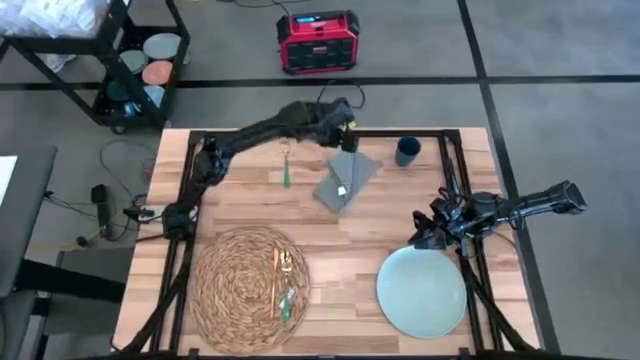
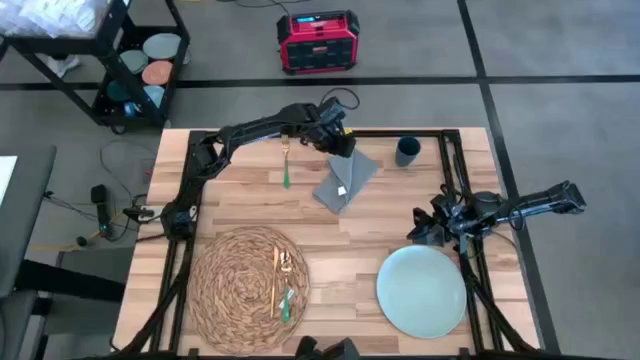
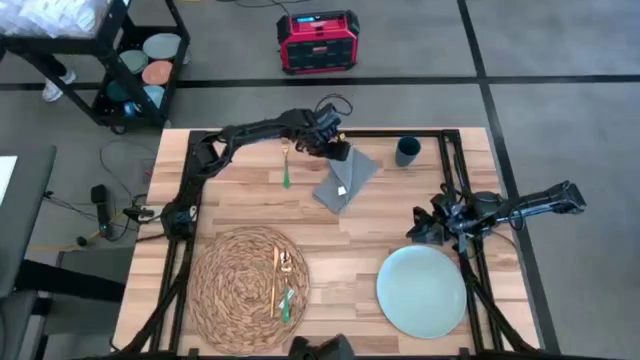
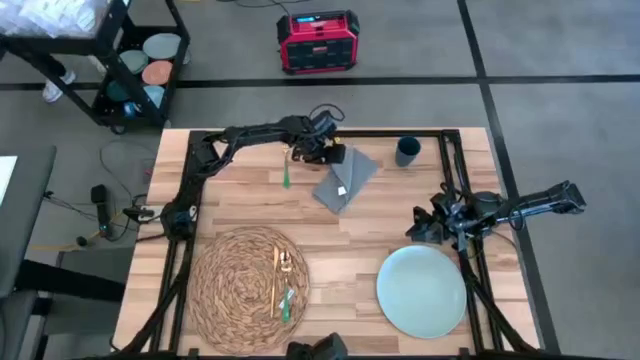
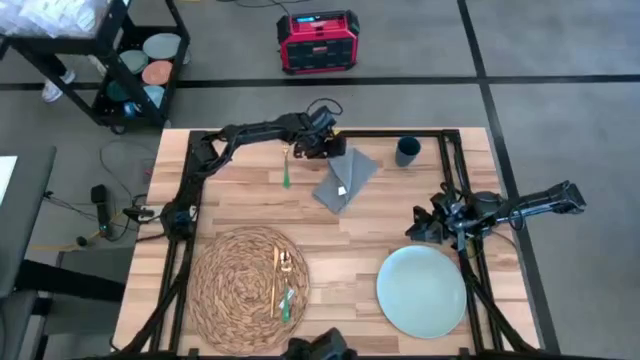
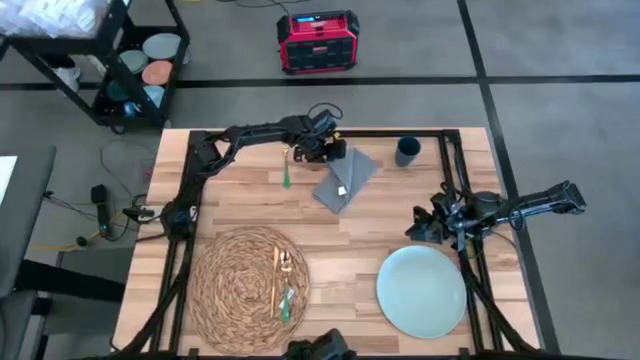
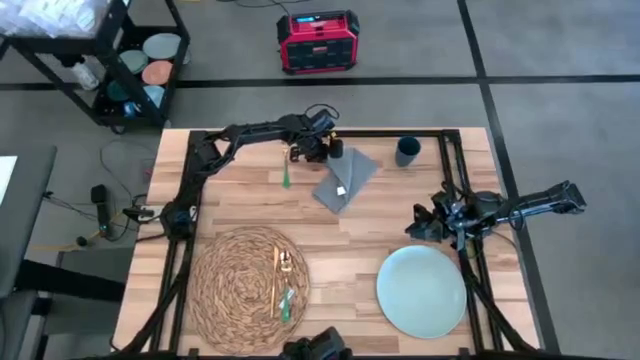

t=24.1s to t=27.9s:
Task: Set table place
Fold the gray table napkin

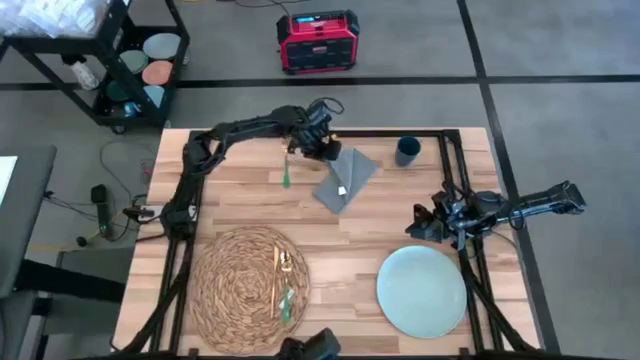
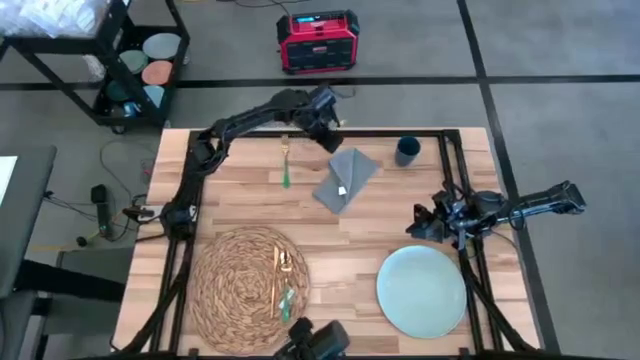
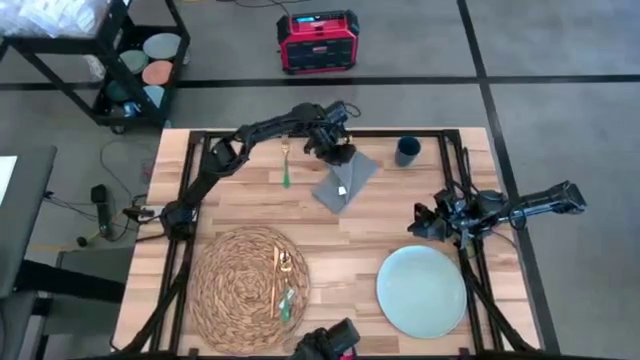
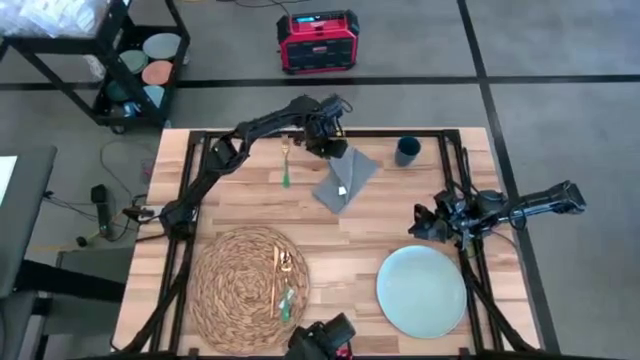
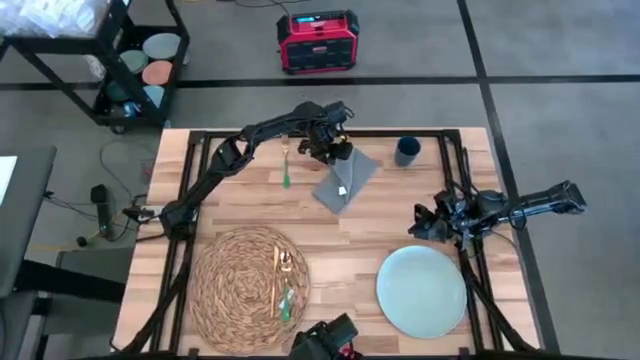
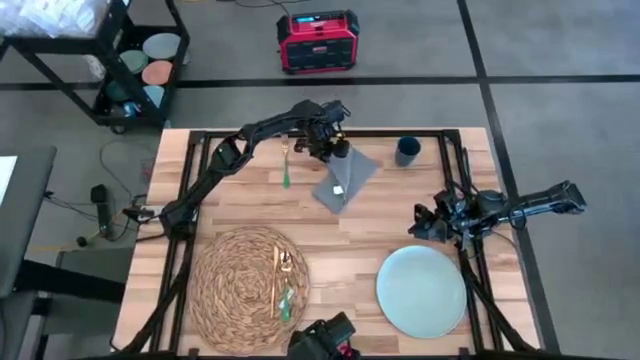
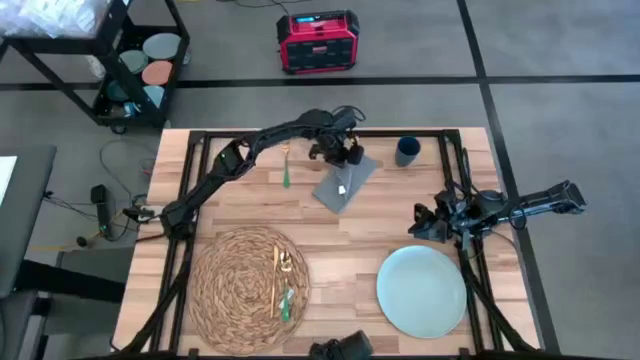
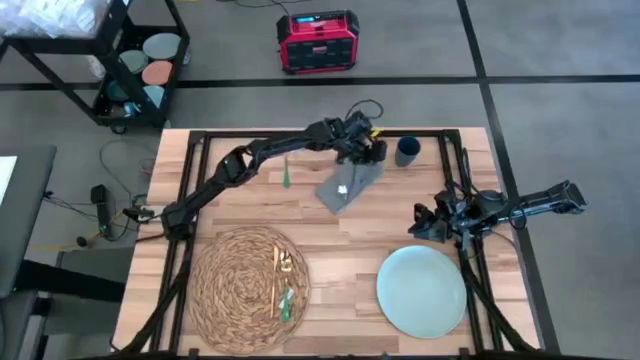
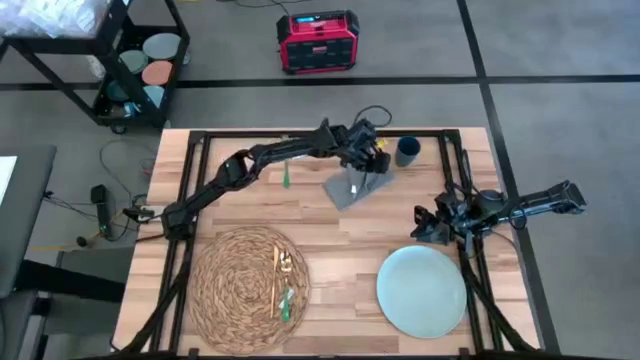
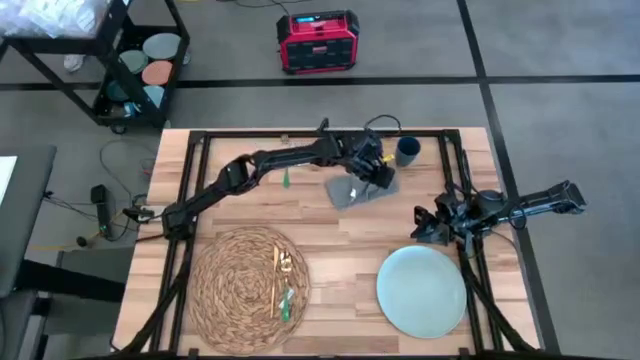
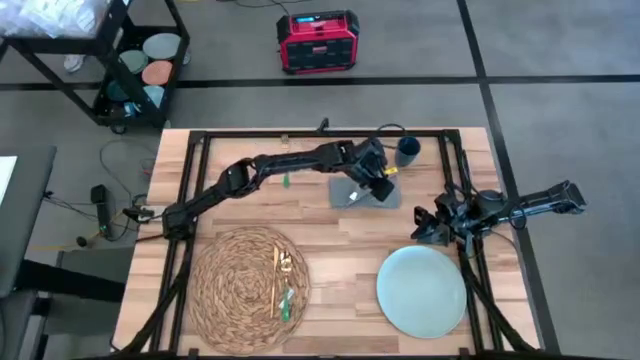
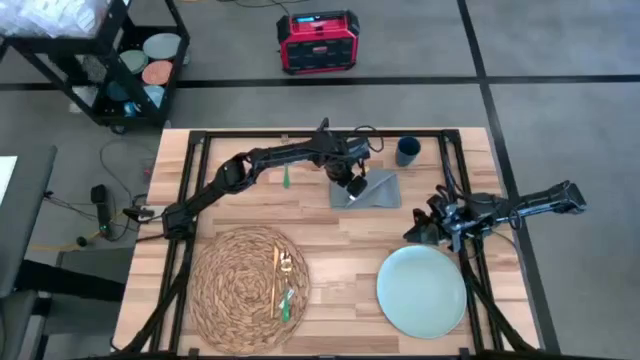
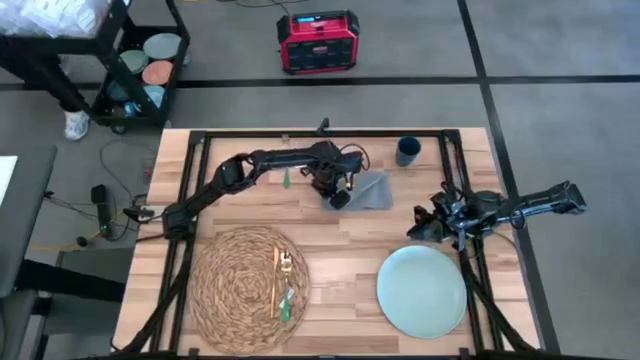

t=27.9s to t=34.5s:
Fold the gray table napkin

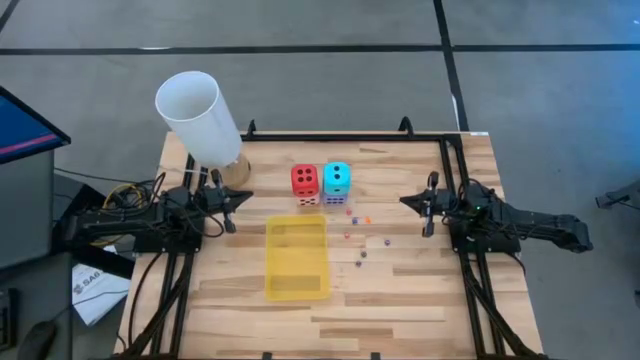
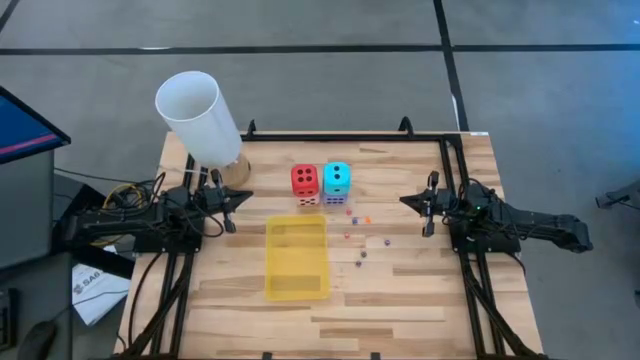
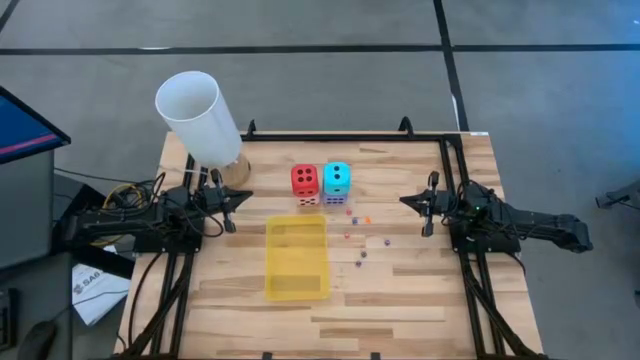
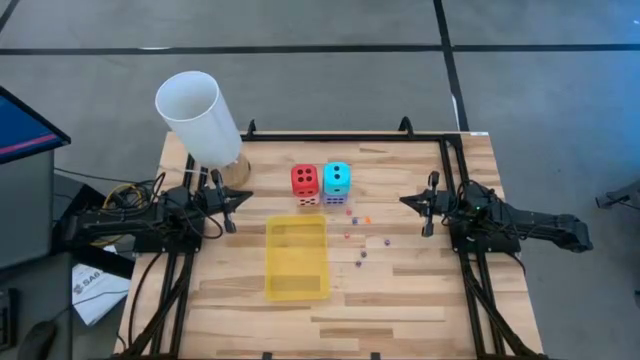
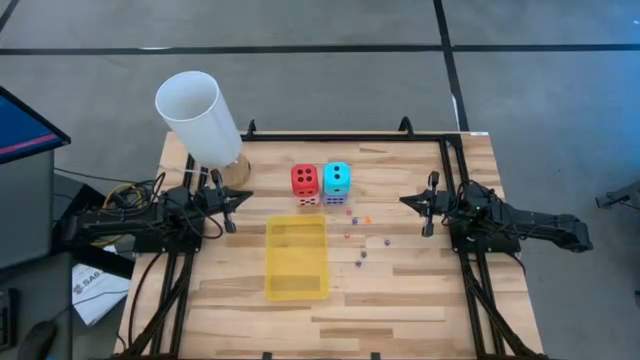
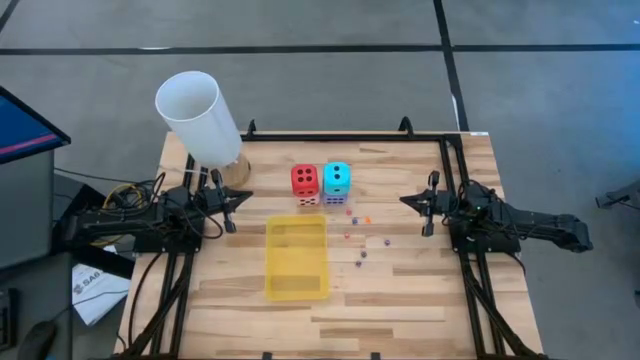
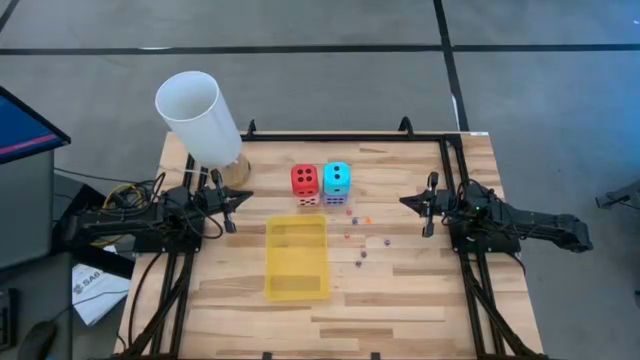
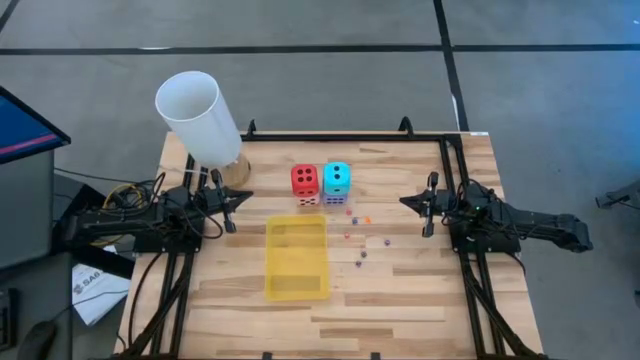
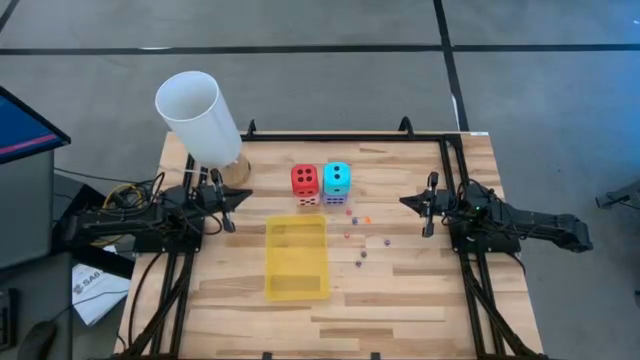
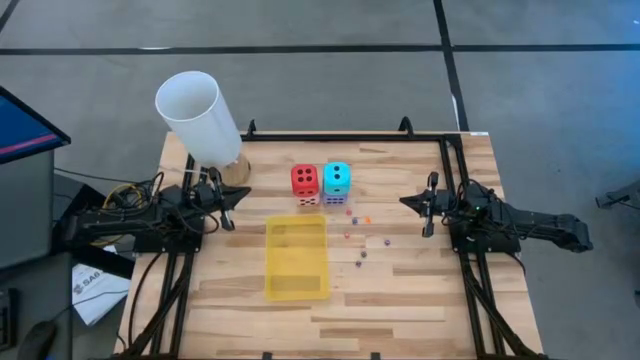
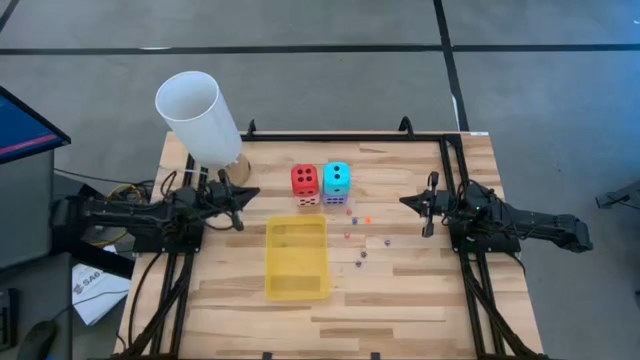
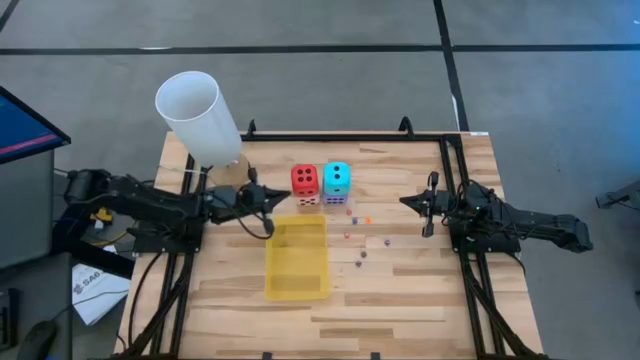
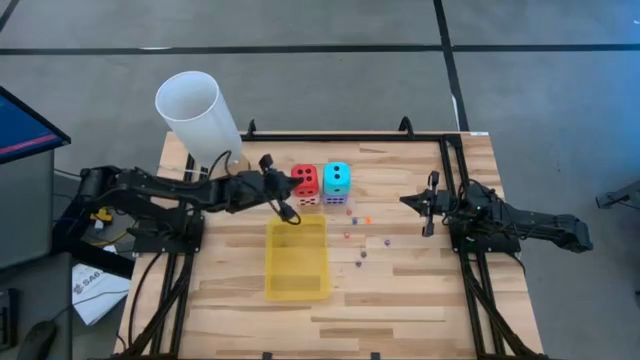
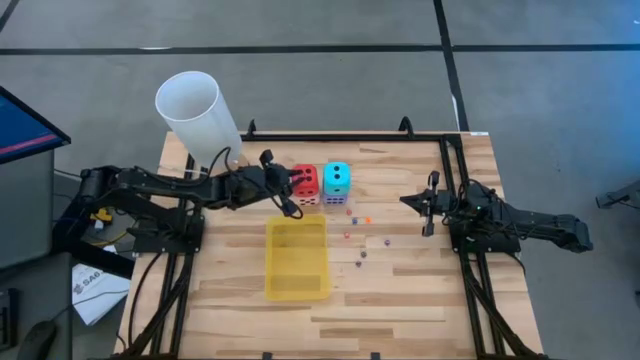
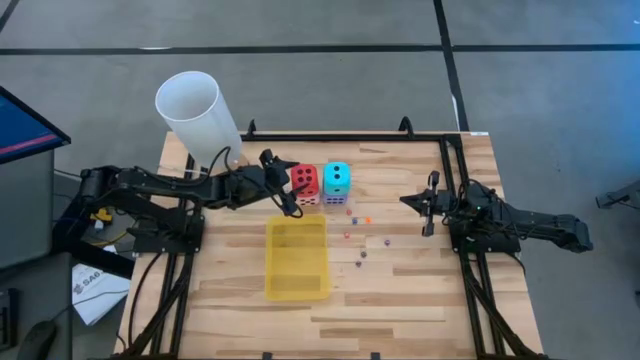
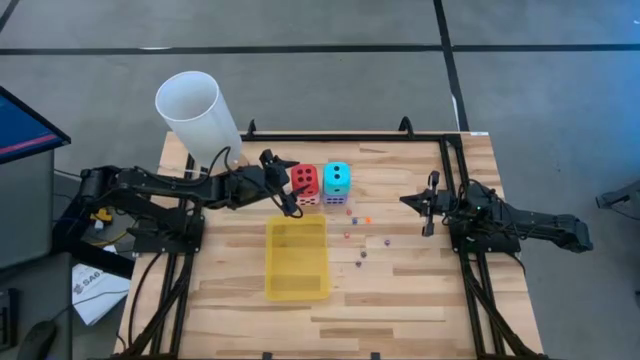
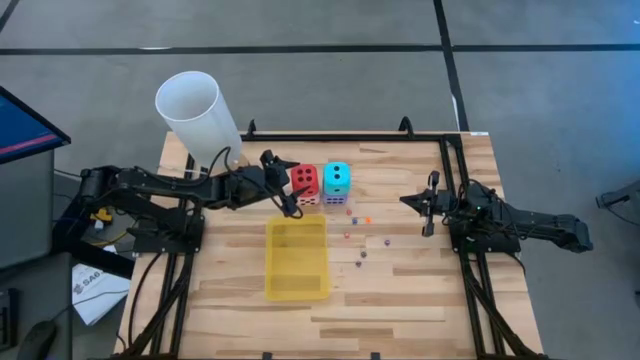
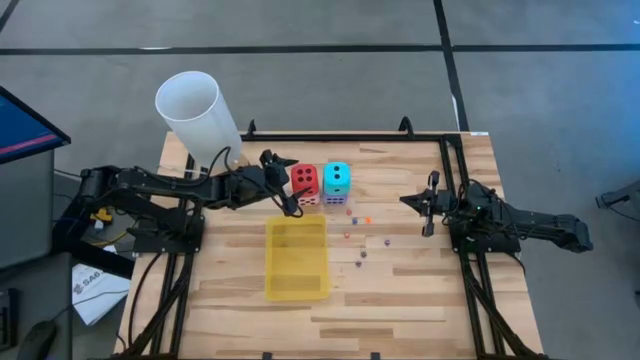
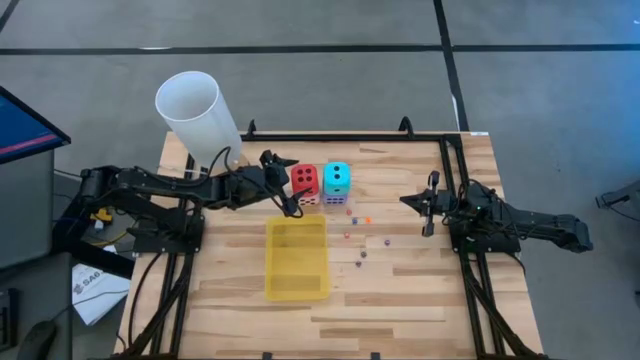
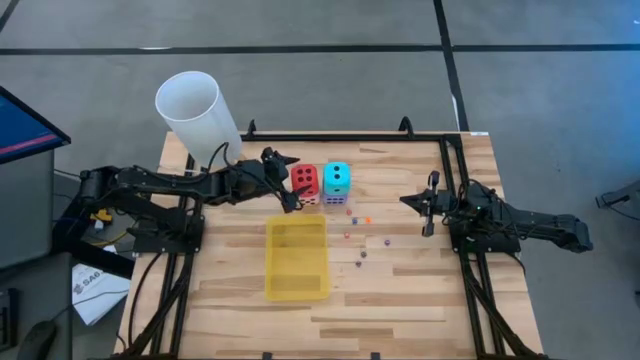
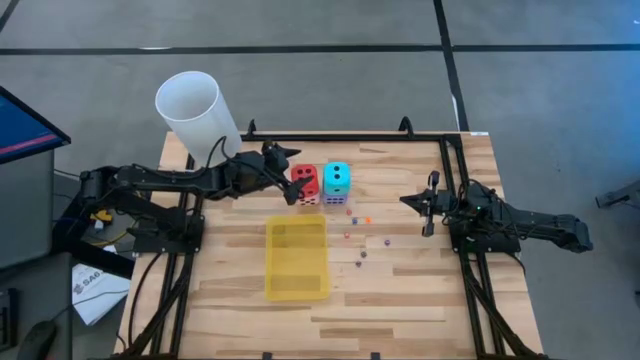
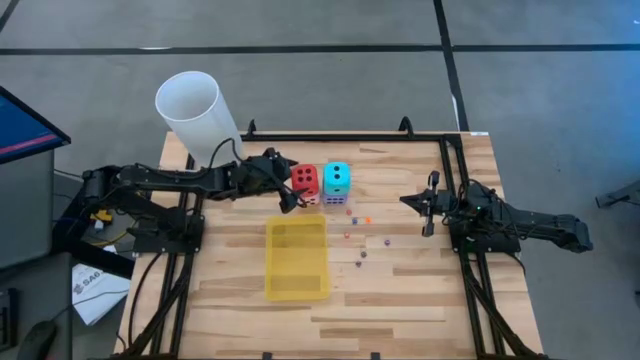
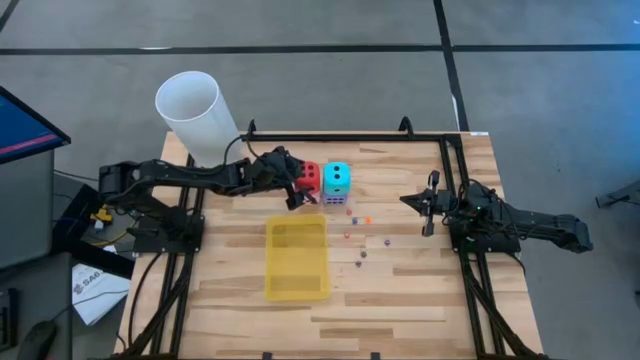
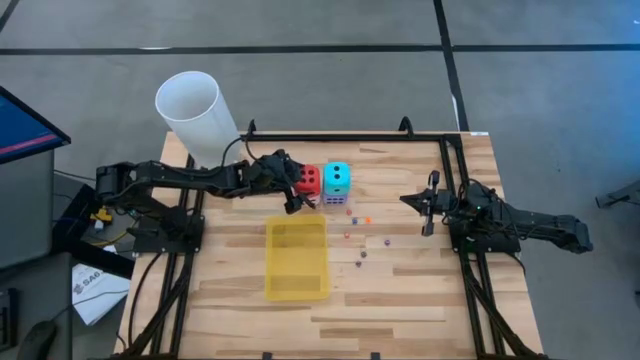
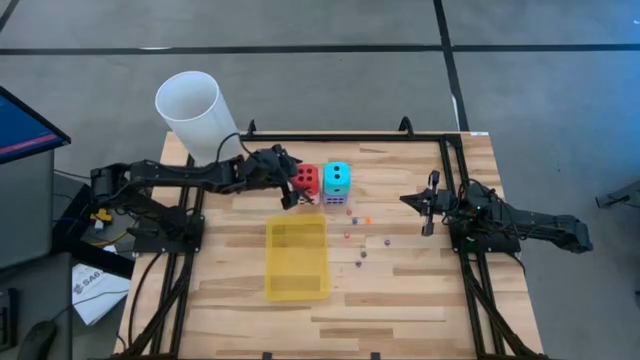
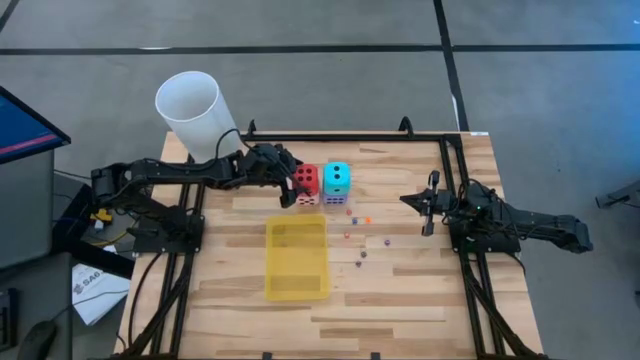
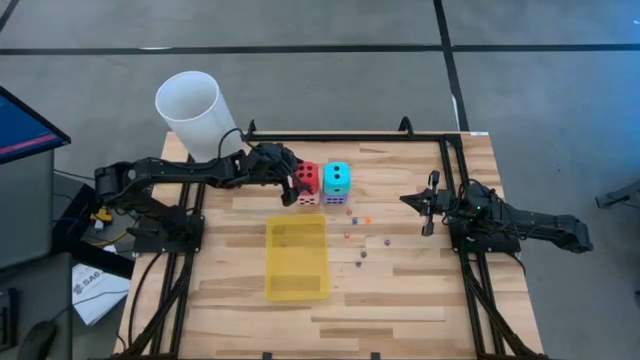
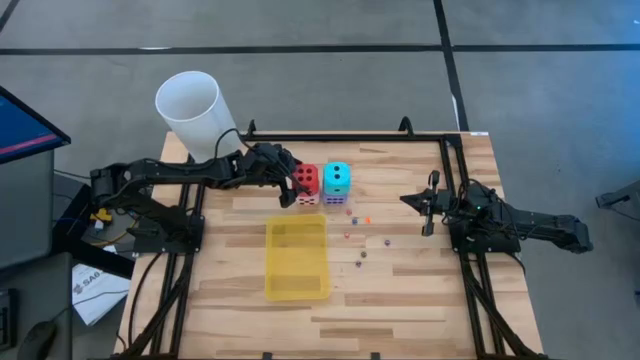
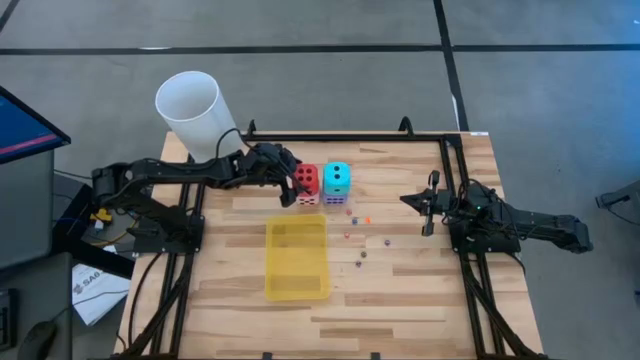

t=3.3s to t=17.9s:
Task: Pick & Place Dice
Put the red die into the yellow bin
